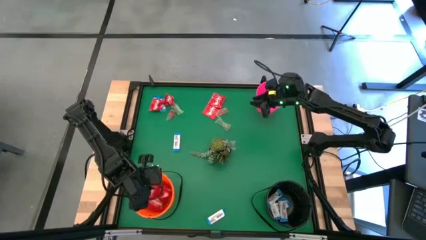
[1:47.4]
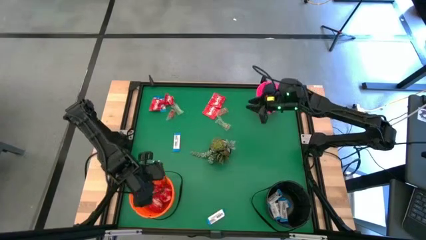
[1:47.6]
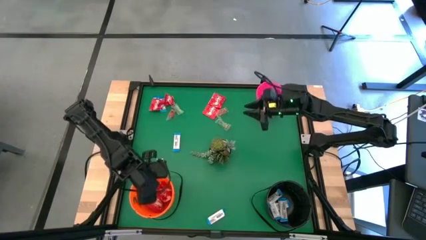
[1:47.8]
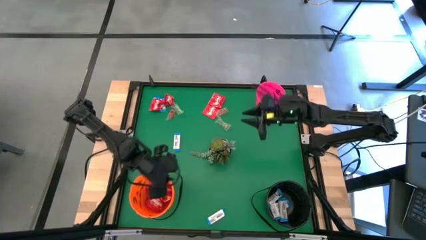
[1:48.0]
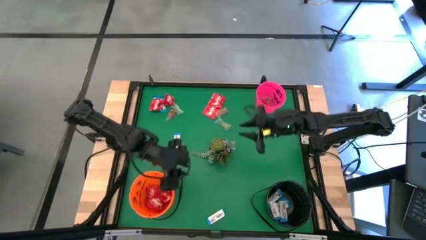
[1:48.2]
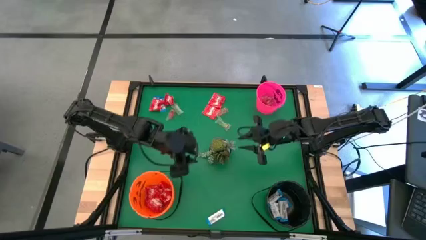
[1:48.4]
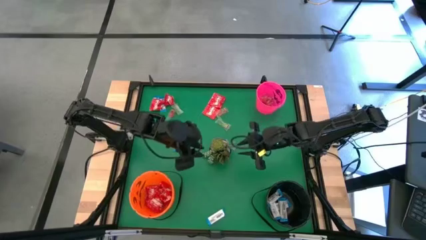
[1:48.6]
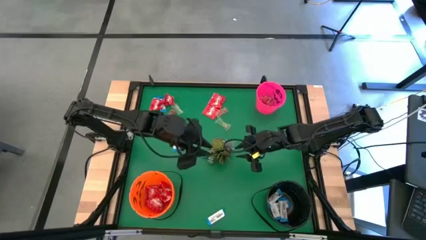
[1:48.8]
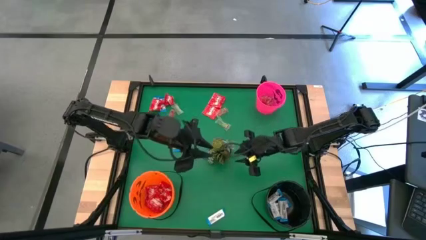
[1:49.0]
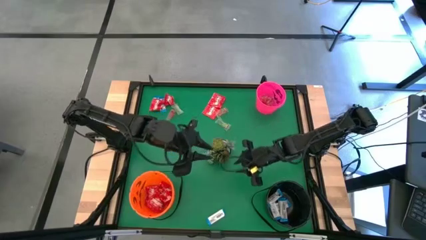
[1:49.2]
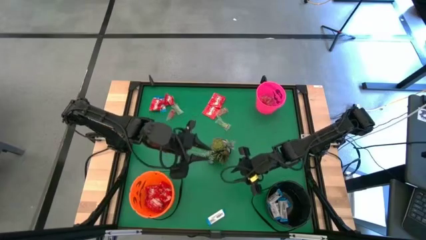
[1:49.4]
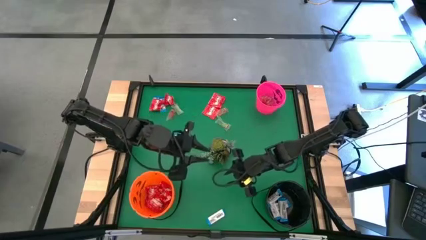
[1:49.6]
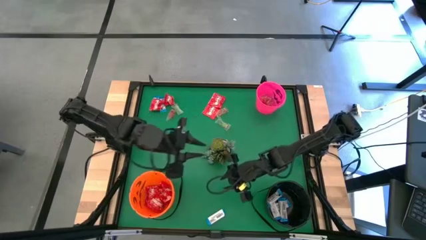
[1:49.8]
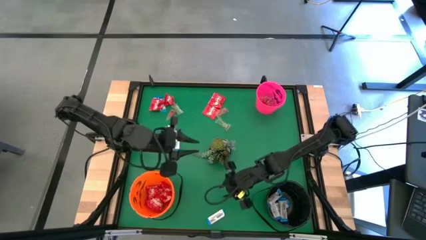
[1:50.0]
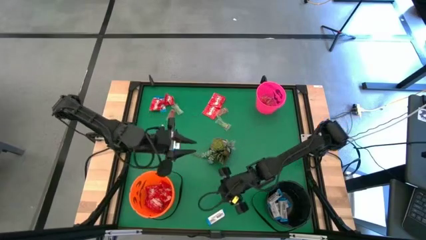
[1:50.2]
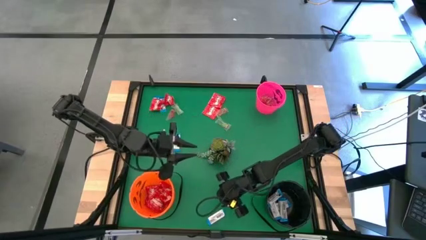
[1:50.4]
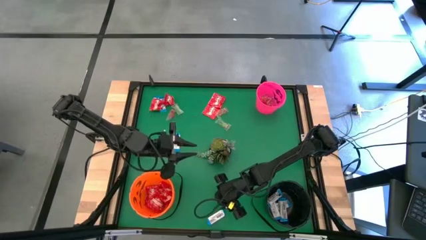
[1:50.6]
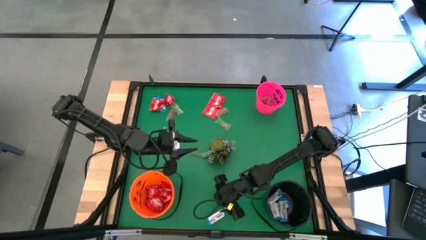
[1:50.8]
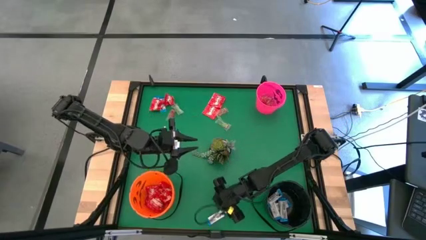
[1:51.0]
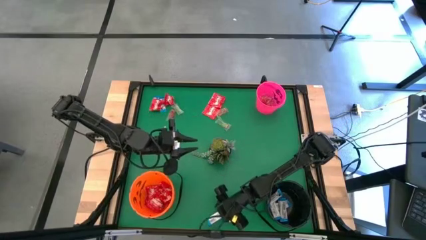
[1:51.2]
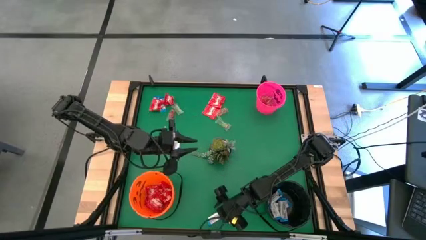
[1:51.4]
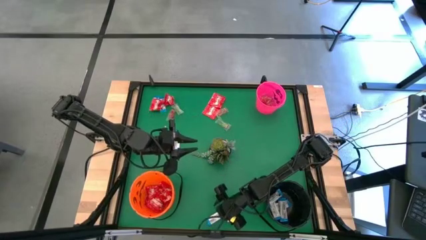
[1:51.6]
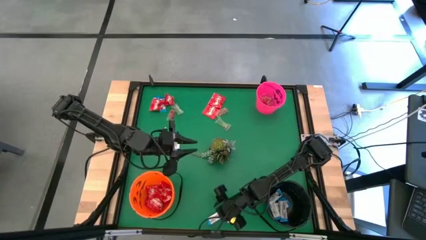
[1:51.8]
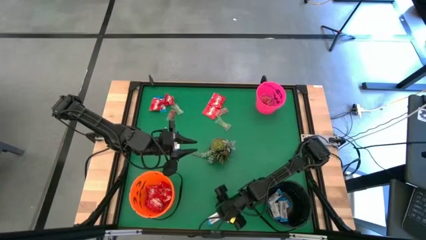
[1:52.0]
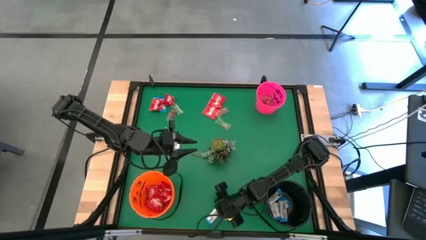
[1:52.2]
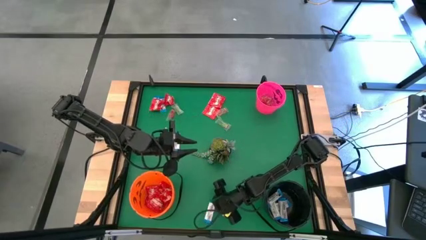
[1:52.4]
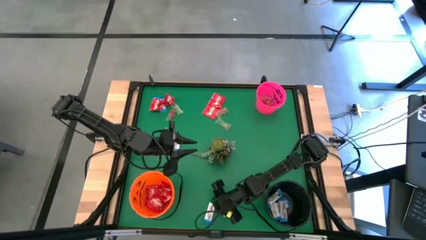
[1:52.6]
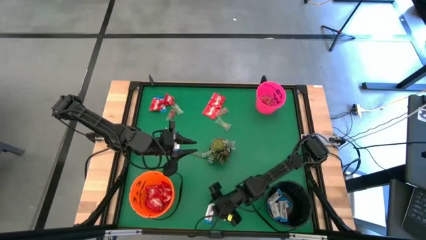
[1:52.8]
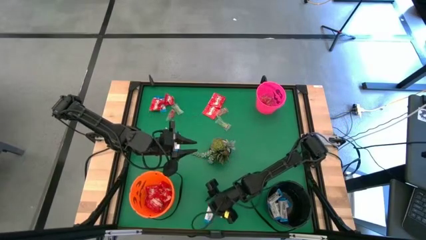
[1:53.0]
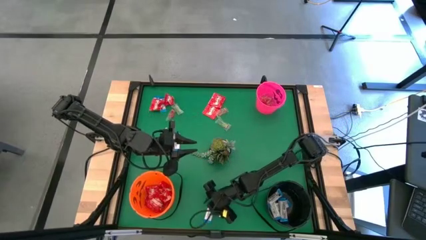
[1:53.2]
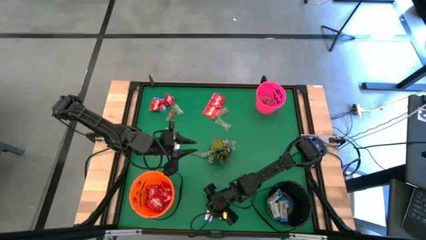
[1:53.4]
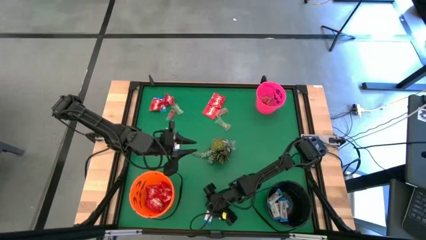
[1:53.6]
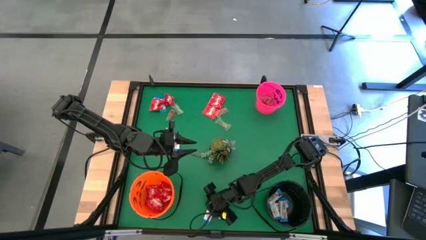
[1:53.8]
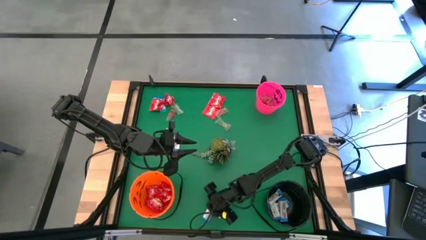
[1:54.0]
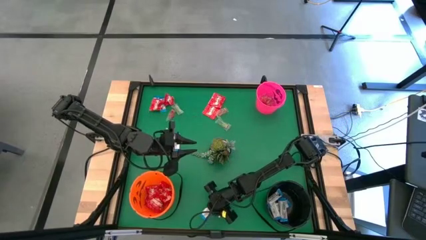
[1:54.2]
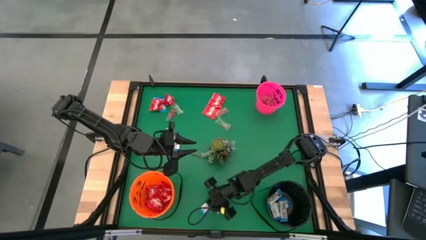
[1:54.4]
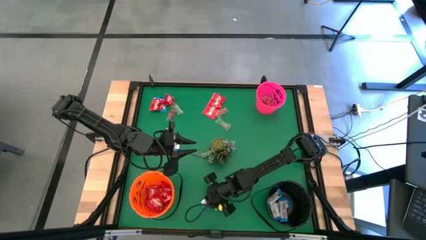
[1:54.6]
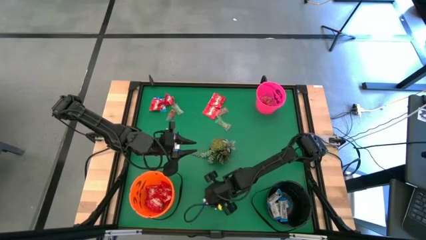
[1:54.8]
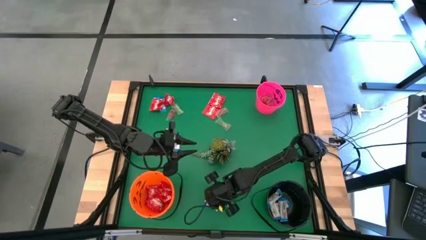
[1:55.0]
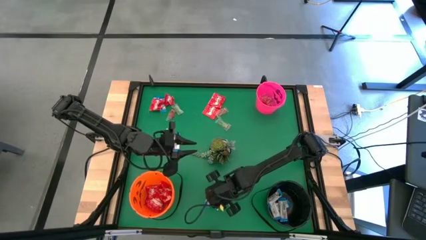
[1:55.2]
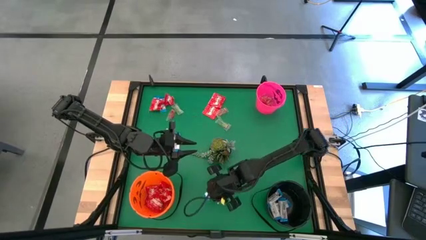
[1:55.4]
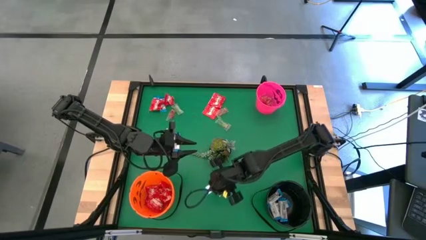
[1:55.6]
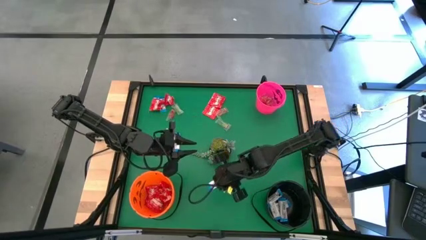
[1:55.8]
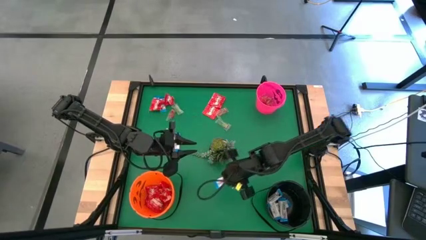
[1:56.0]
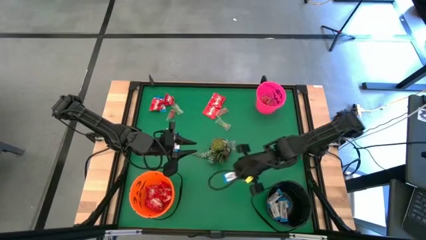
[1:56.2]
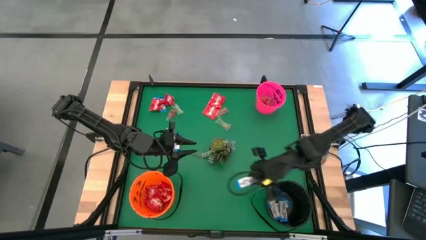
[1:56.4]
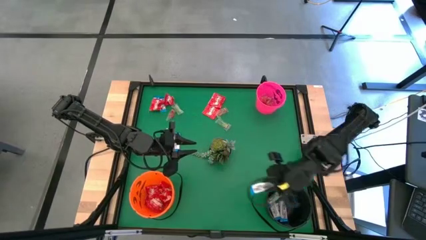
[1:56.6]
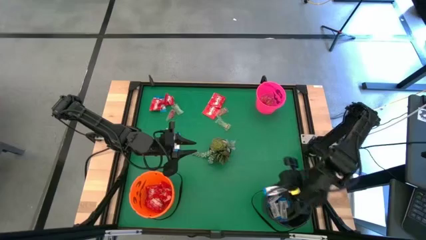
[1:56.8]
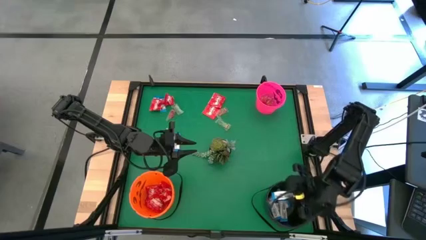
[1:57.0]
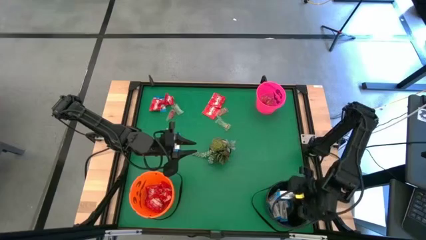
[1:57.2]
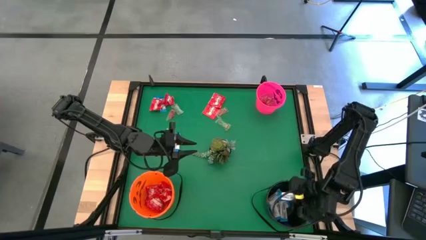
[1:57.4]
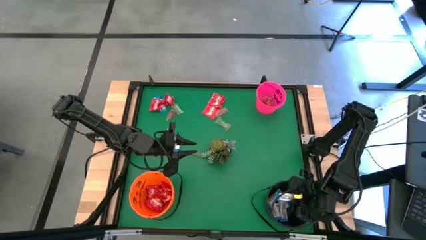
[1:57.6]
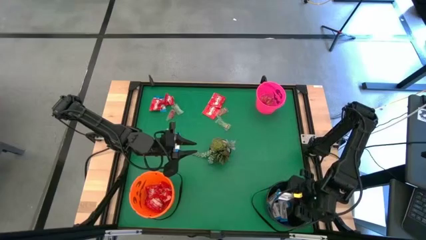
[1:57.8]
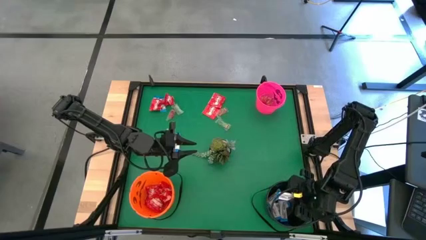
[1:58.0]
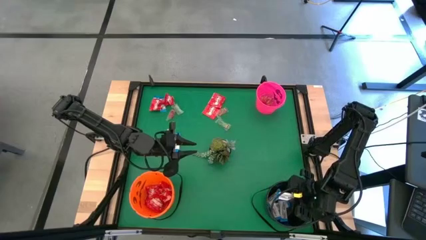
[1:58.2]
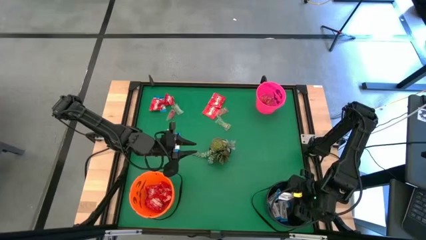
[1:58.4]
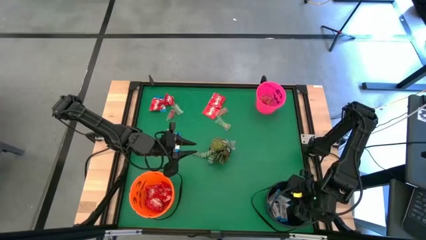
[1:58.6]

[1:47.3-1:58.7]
Task: Sort candy
Put the white chocolate into the black bucket

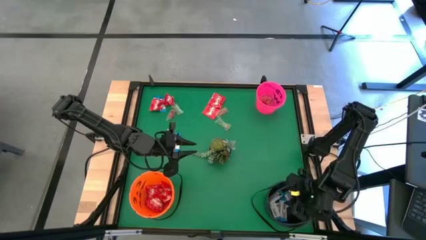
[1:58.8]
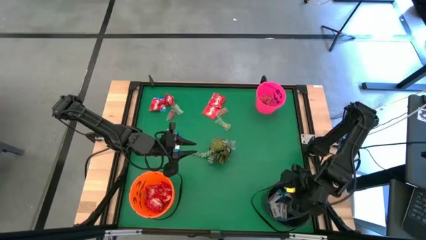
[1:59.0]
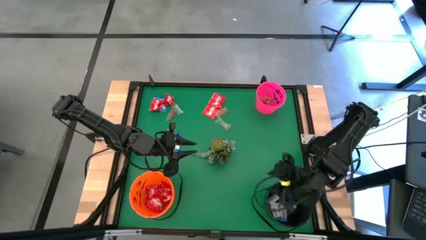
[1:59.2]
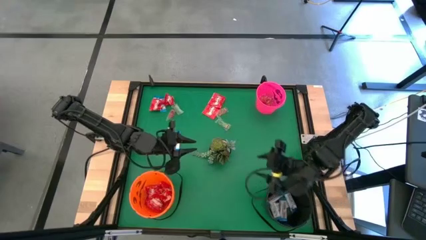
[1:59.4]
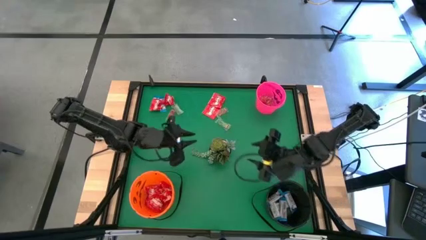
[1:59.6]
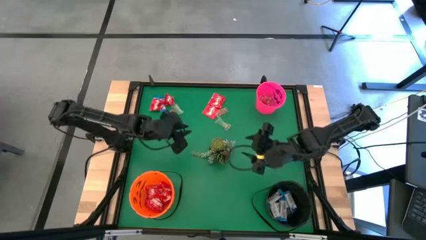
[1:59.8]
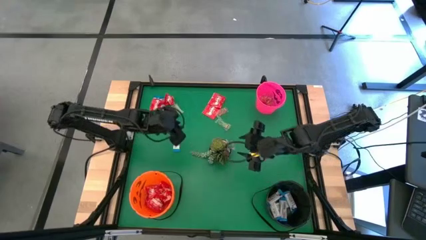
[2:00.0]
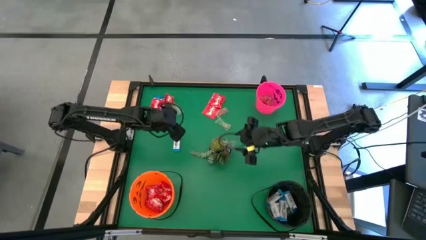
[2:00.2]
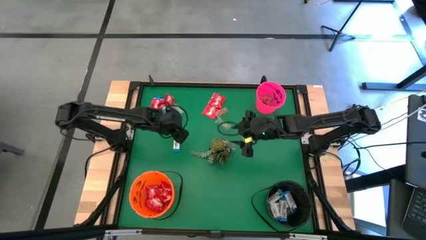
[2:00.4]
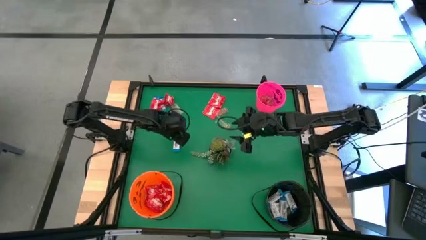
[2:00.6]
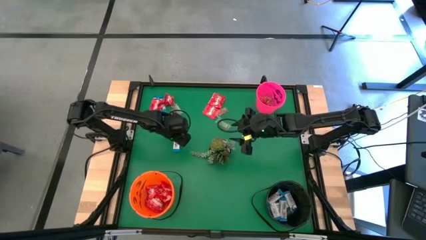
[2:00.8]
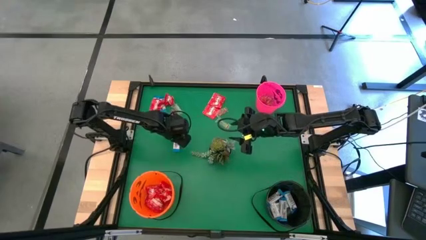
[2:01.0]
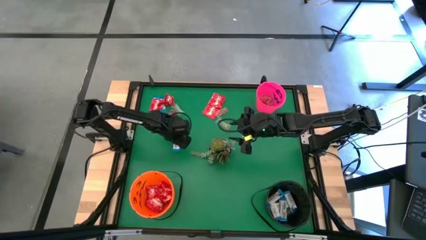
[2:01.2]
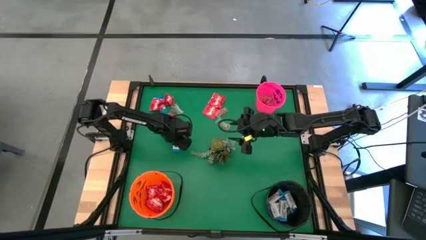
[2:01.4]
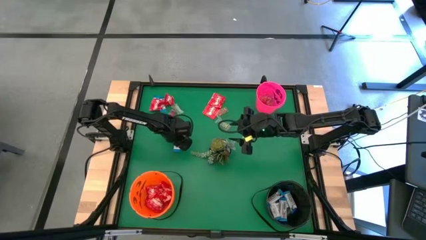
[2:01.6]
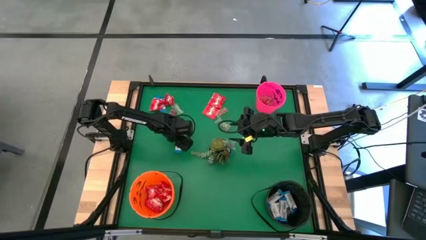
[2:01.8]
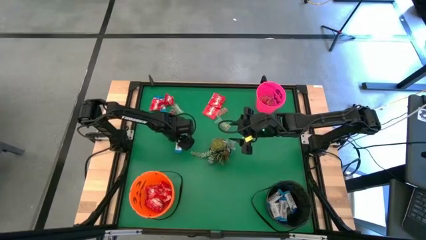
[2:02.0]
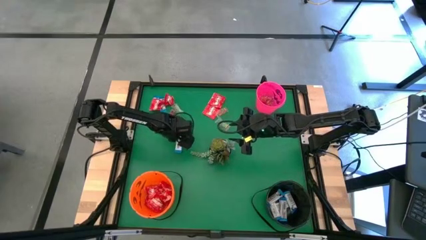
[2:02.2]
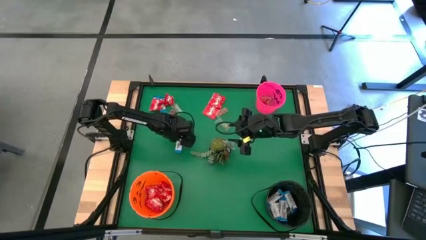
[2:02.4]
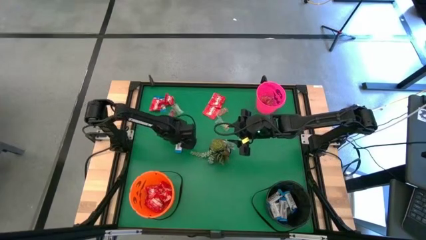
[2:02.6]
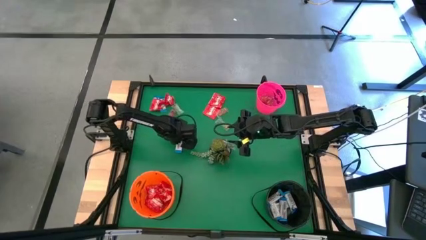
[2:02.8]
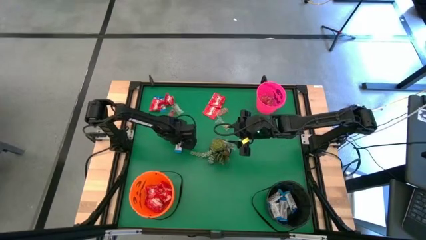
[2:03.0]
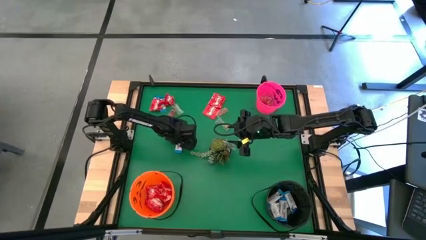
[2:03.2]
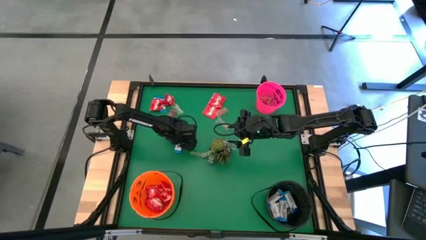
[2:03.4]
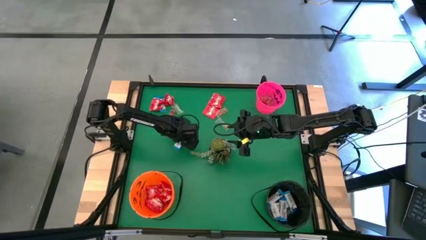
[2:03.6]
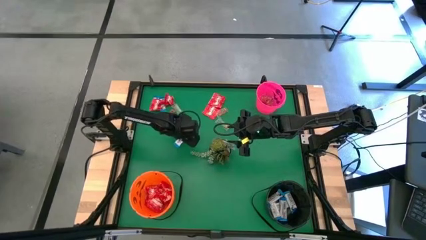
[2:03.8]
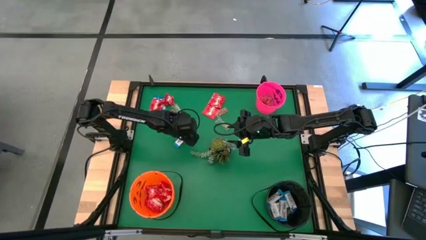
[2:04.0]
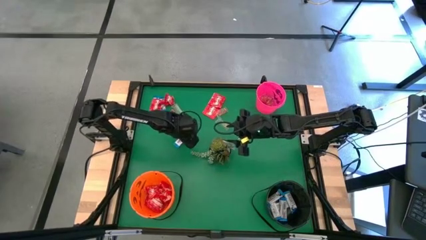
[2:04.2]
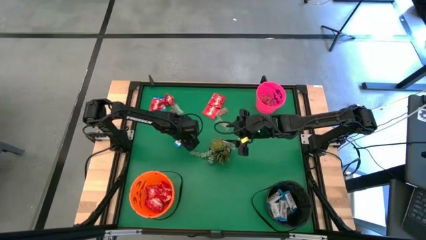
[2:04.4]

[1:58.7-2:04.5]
Put the white chocolate into the black bucket
